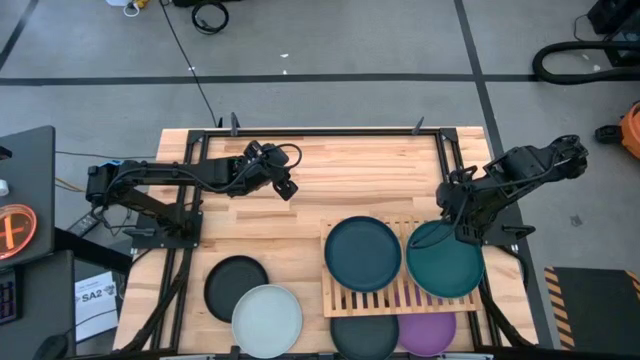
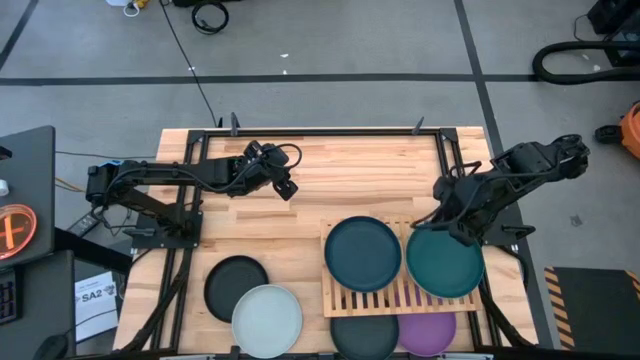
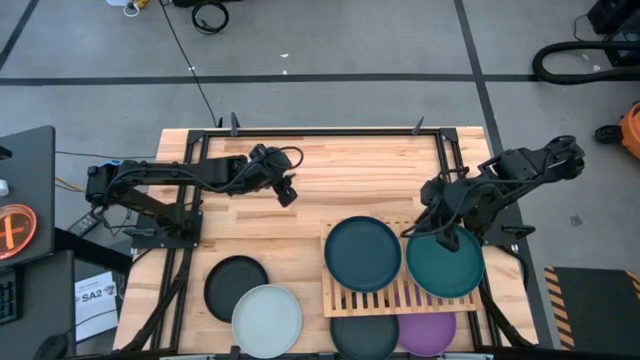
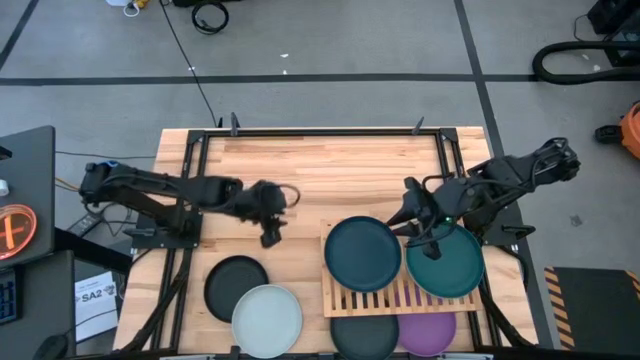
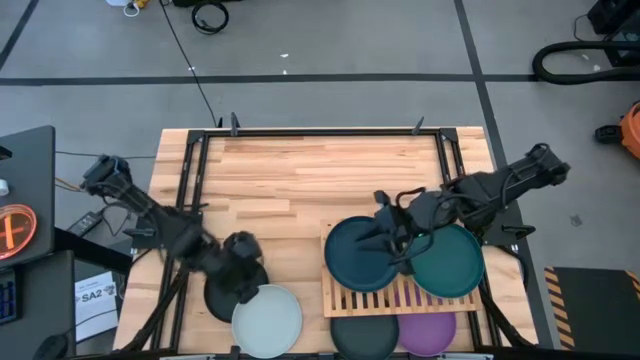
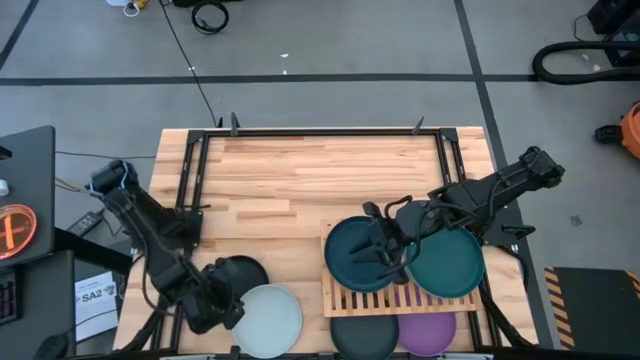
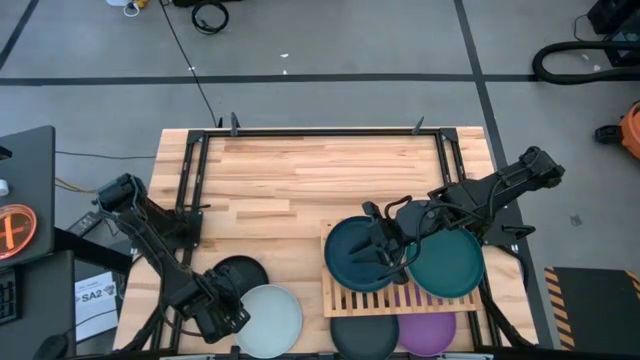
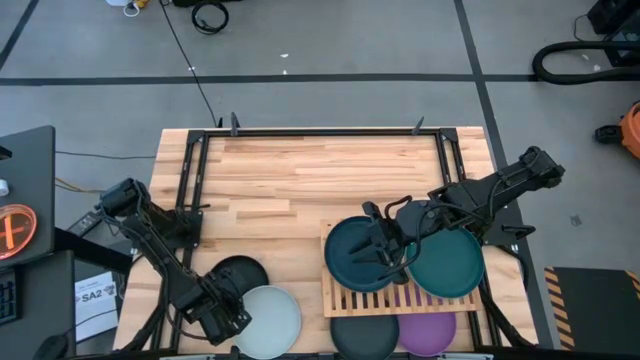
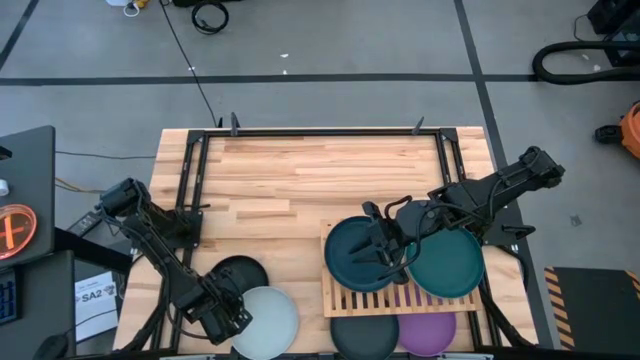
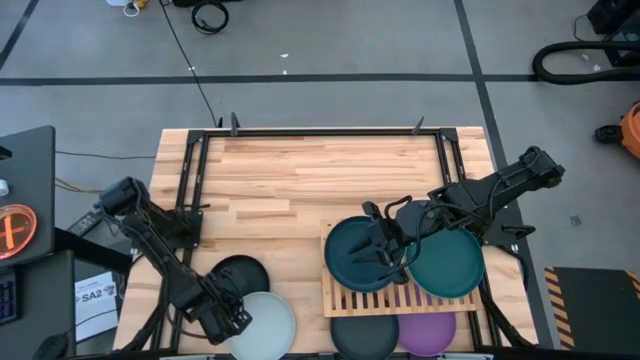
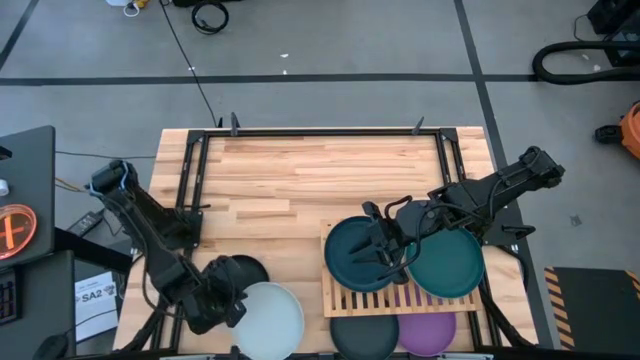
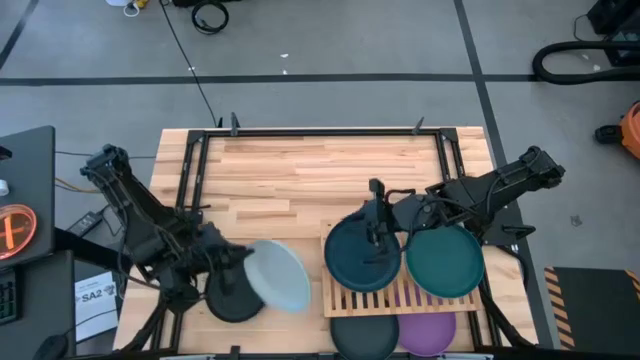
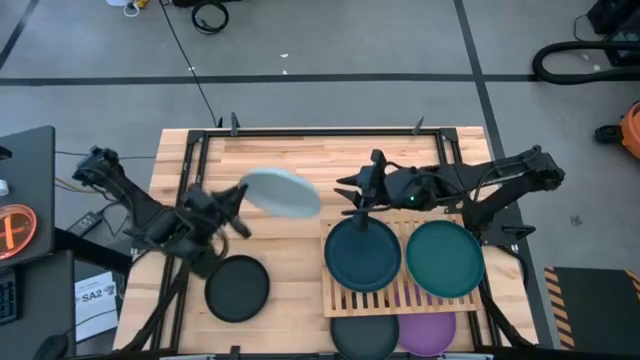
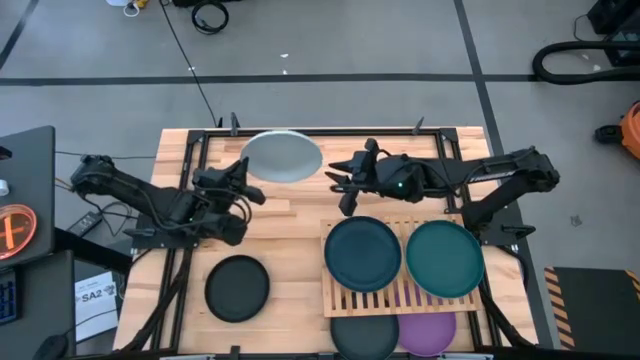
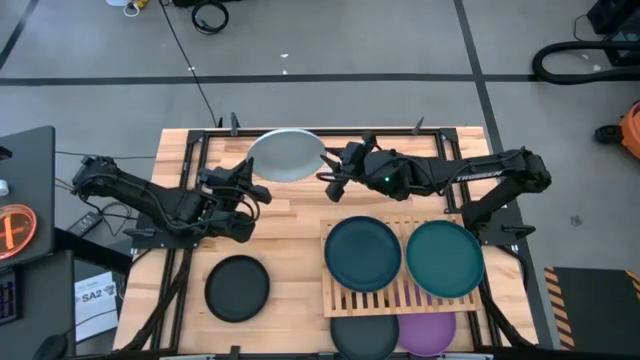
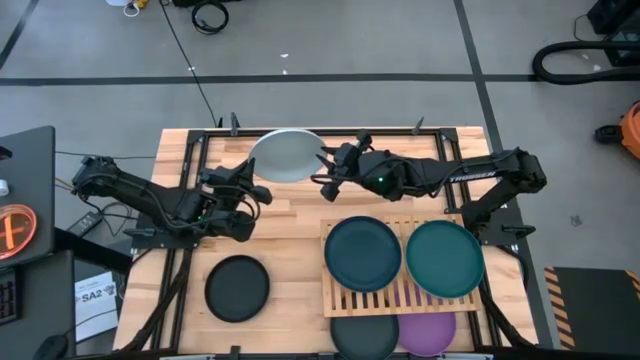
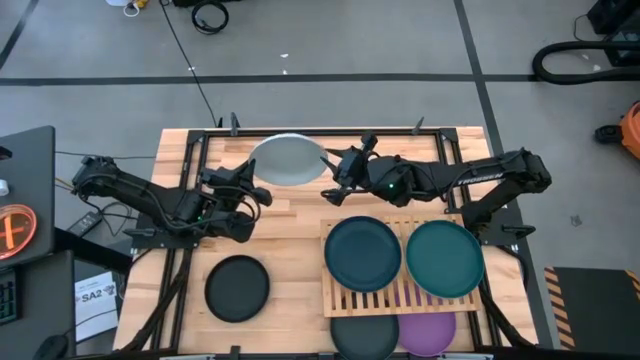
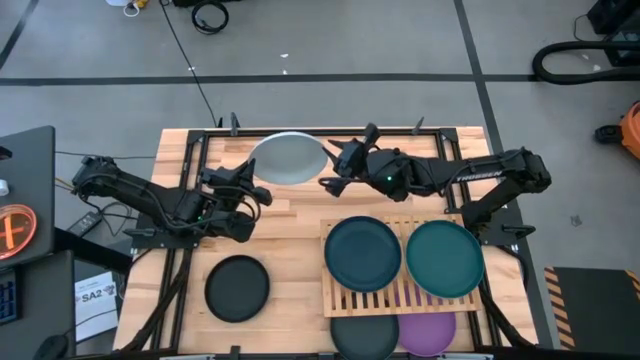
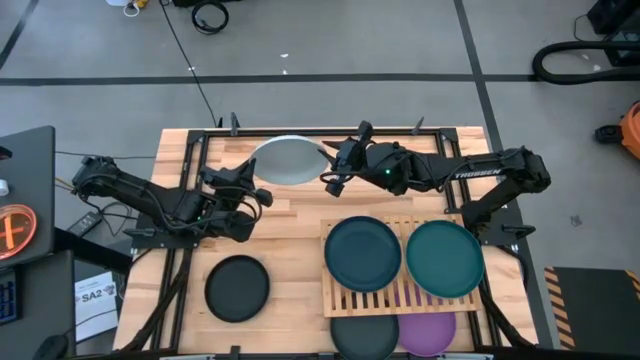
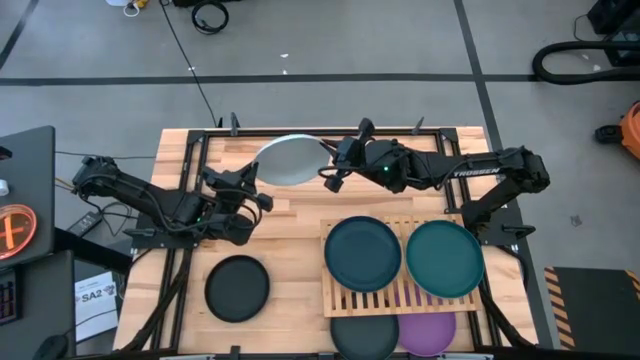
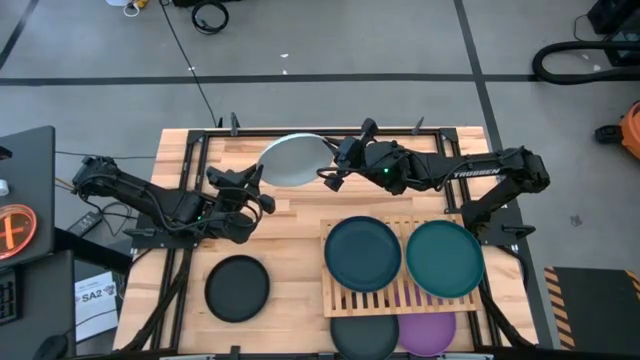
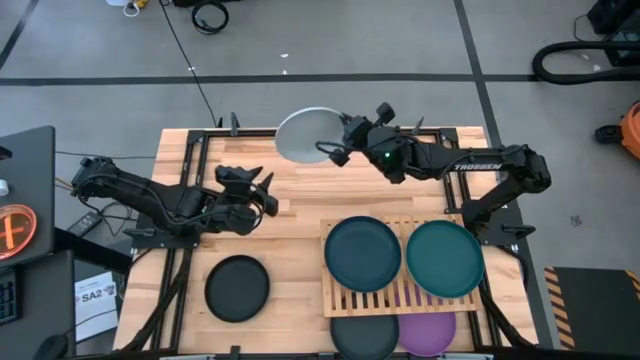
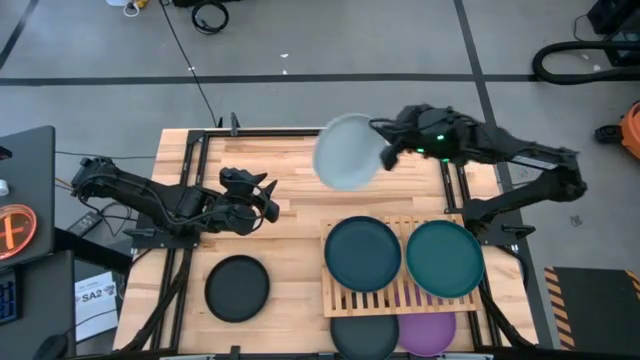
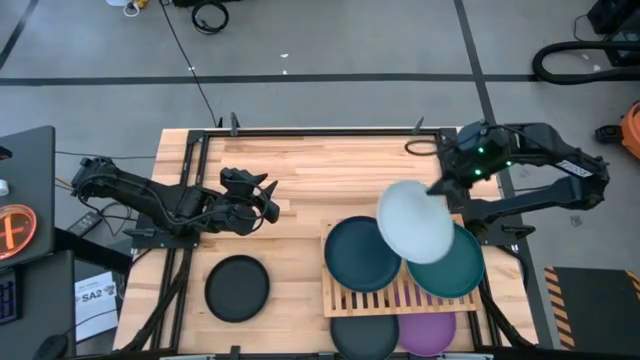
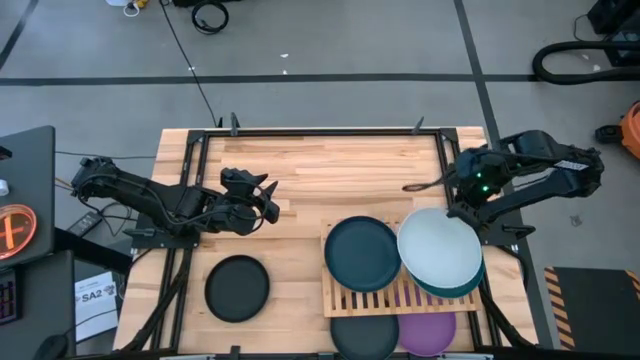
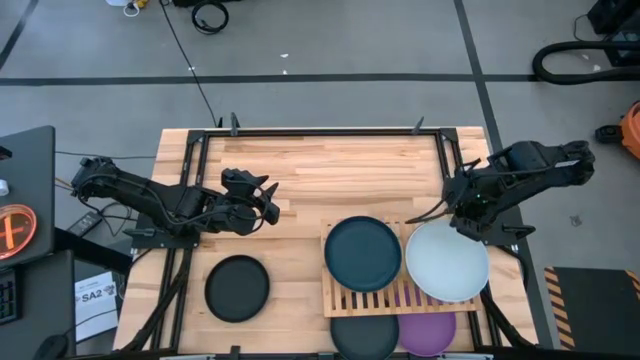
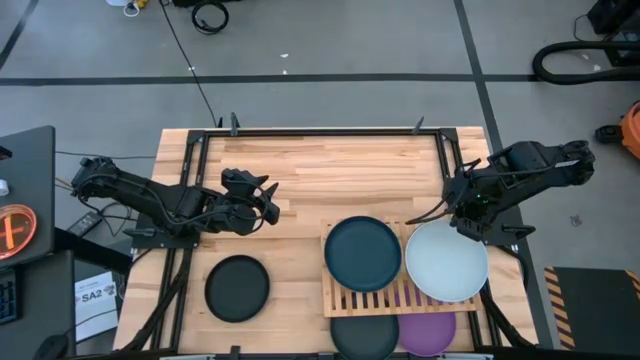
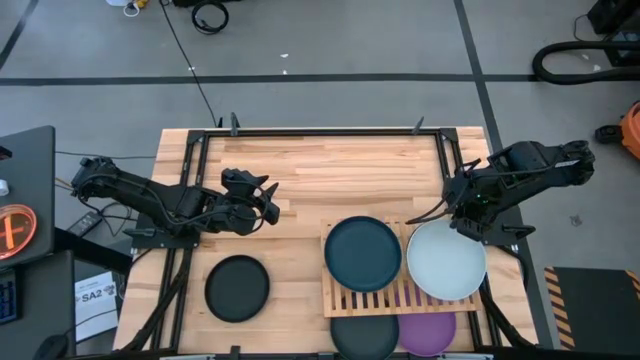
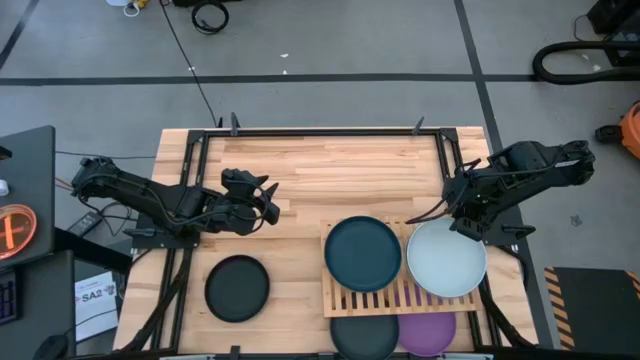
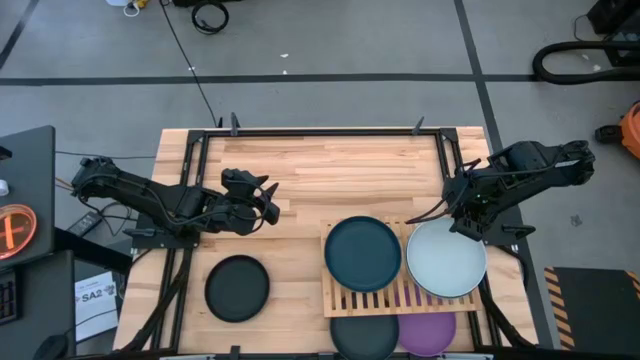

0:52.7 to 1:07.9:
Task: Place and stack plates onto a shelf
Stack the off white plate on top of the dark green plate

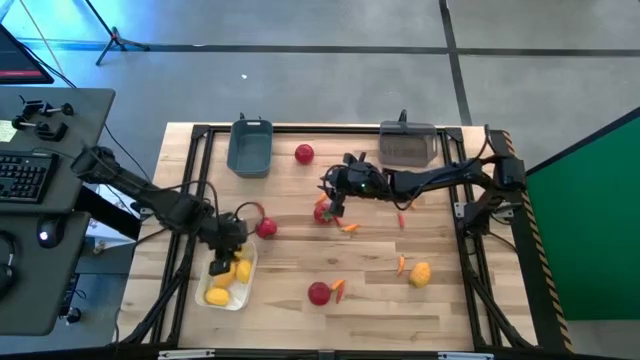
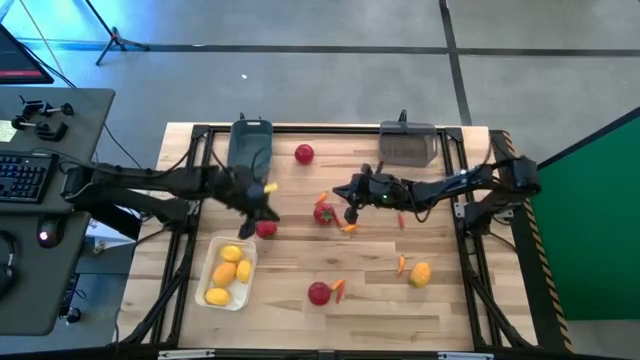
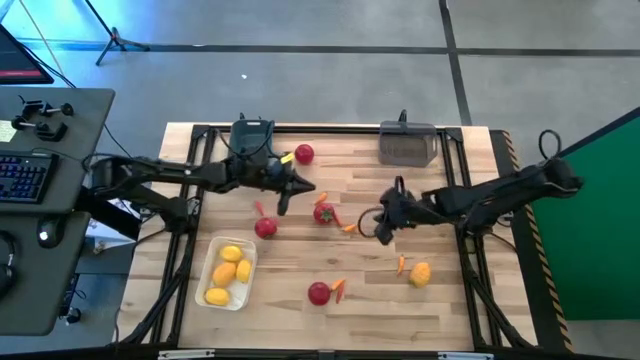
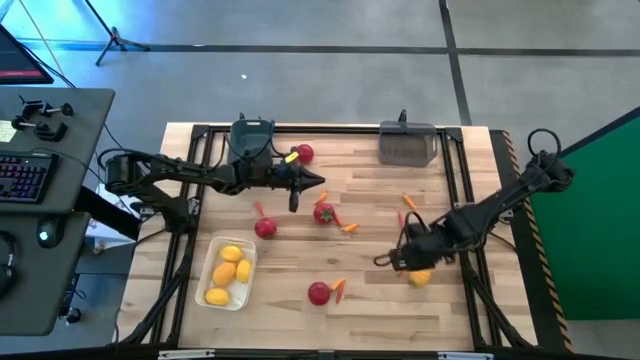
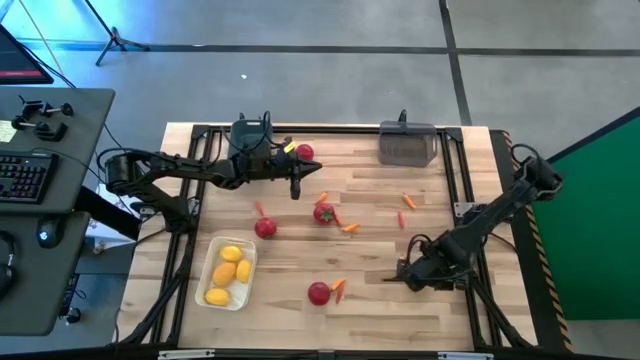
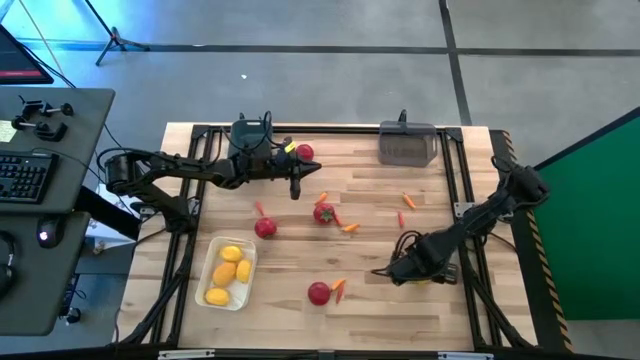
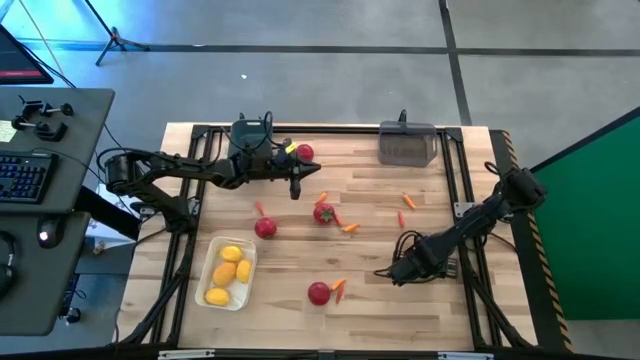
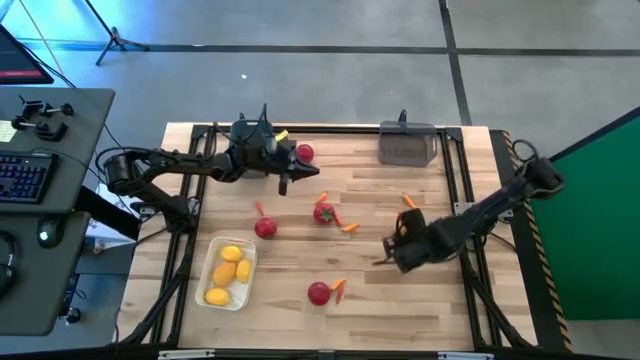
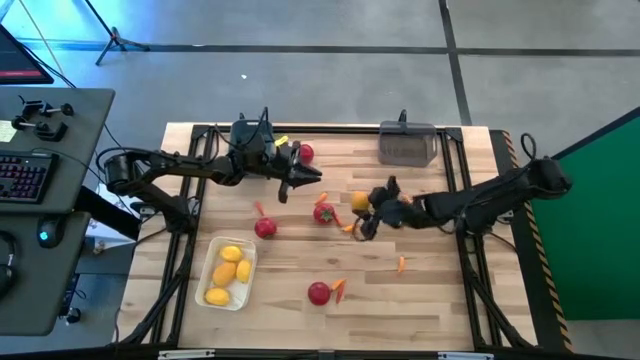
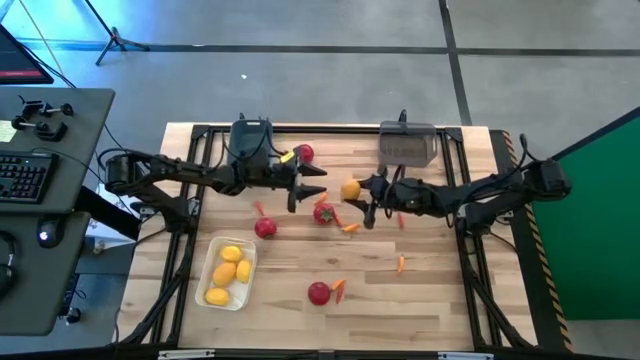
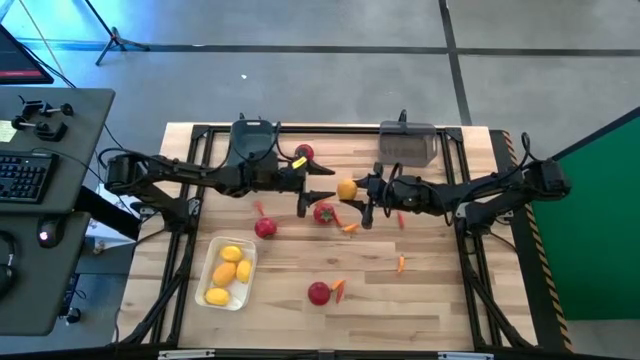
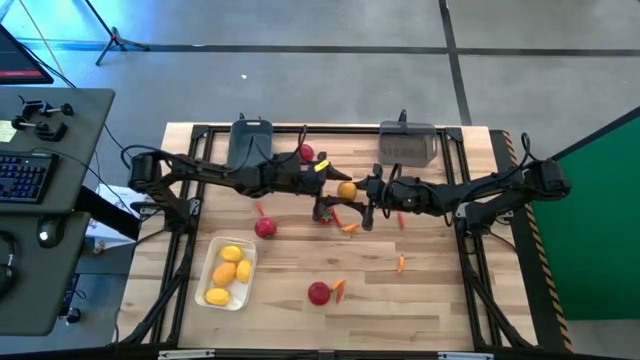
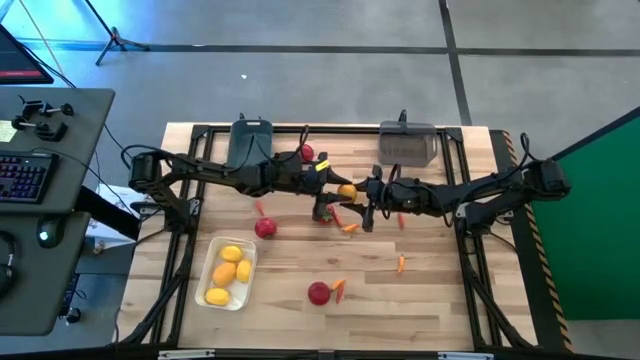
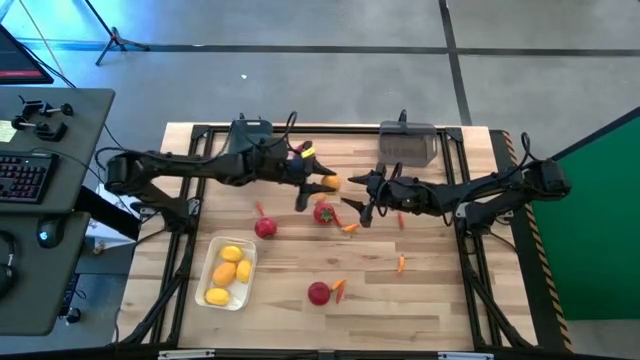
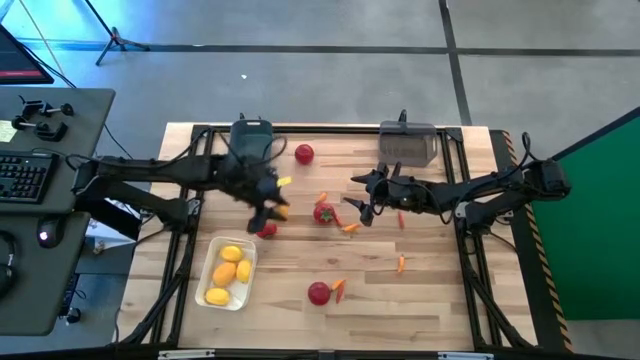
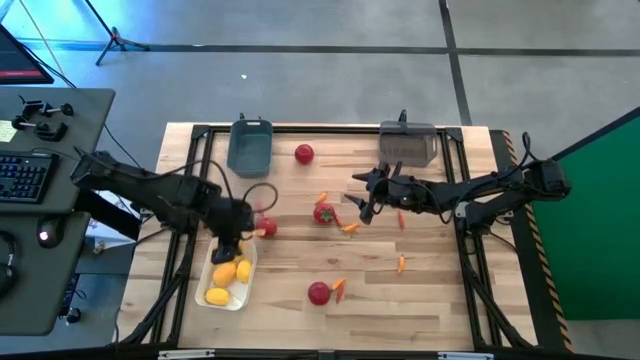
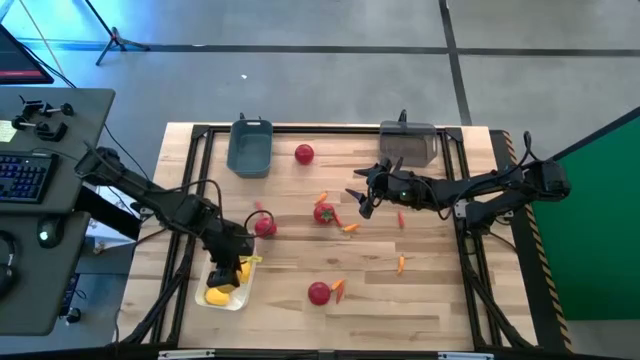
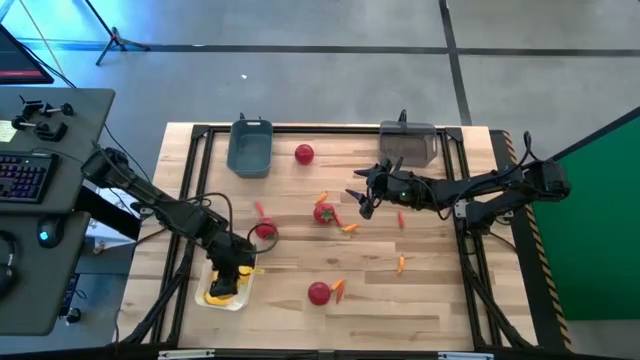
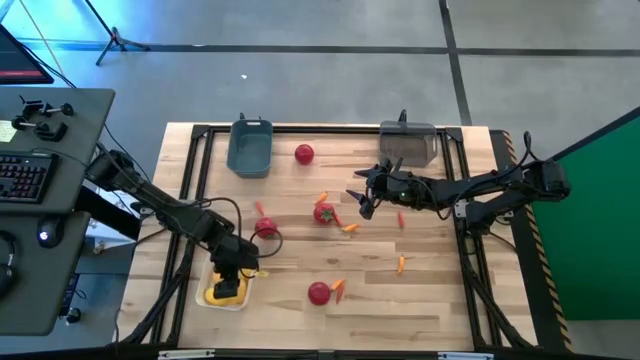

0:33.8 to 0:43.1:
Task: Sort produce into baskets
Put the yellow lemon into the white bin
